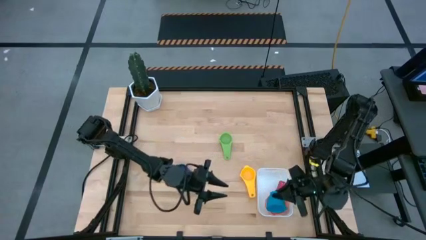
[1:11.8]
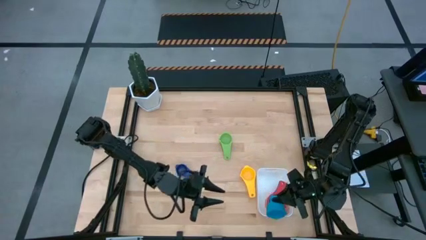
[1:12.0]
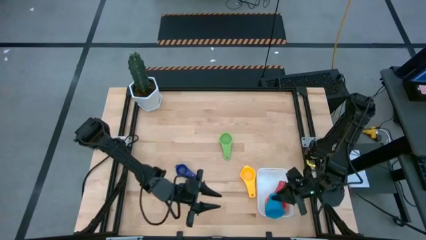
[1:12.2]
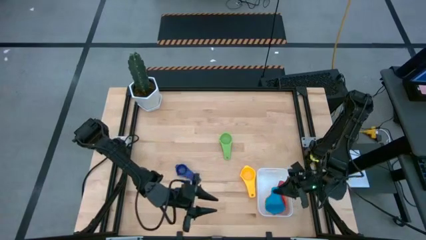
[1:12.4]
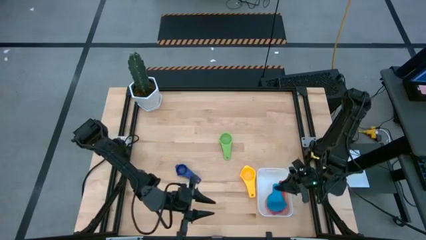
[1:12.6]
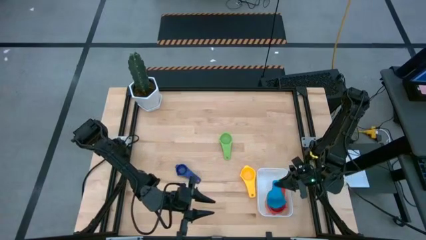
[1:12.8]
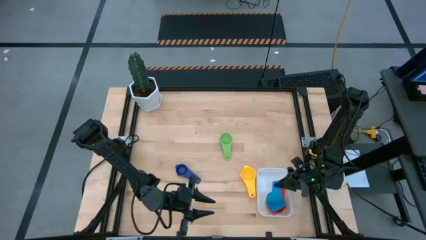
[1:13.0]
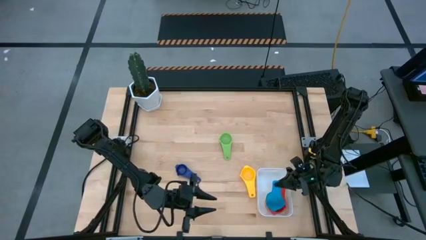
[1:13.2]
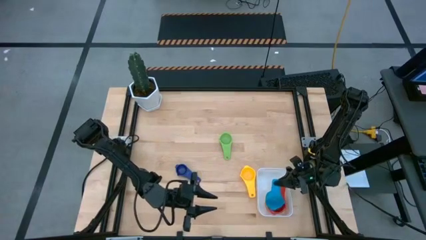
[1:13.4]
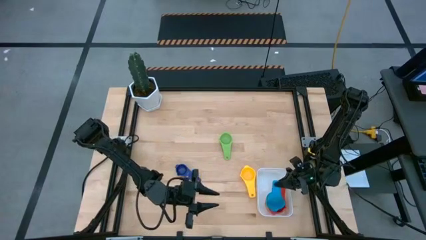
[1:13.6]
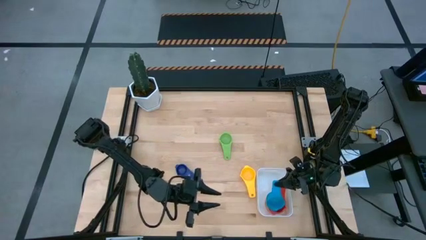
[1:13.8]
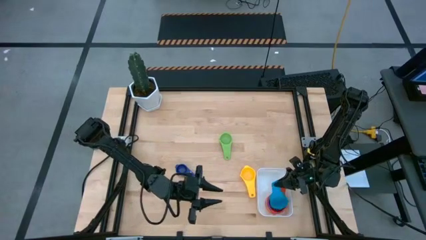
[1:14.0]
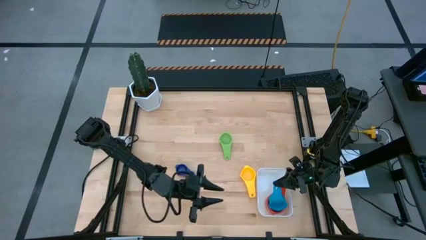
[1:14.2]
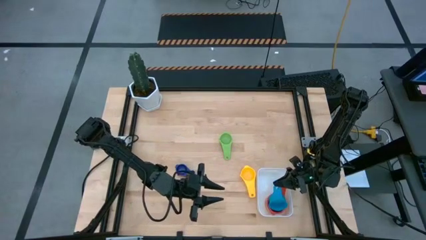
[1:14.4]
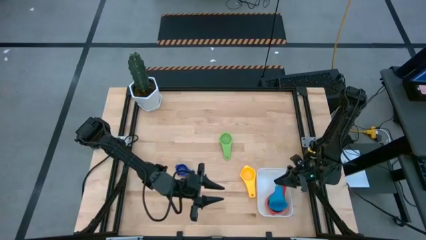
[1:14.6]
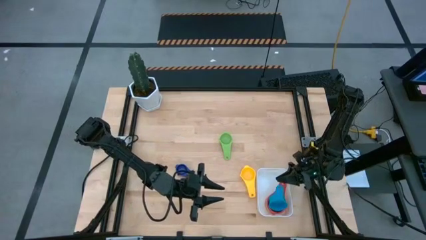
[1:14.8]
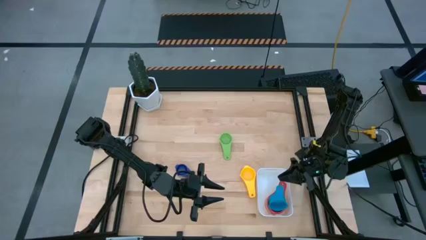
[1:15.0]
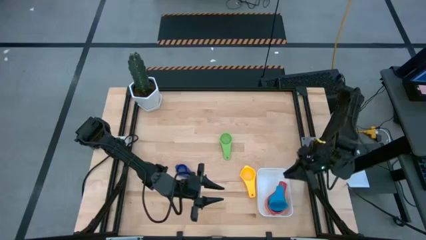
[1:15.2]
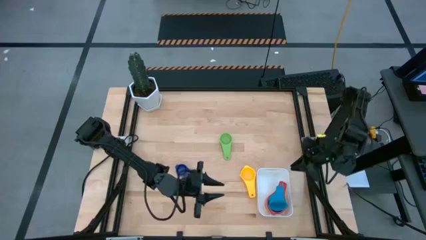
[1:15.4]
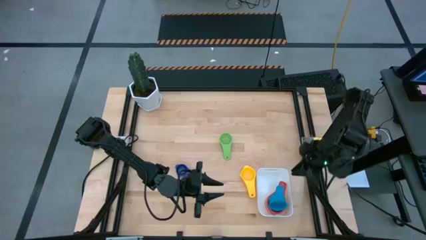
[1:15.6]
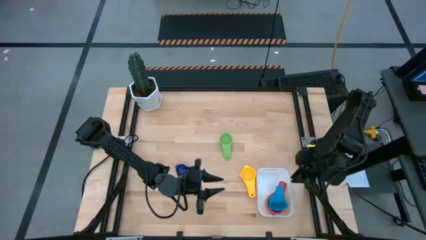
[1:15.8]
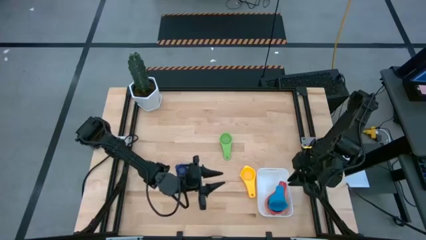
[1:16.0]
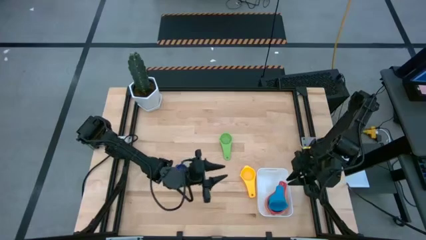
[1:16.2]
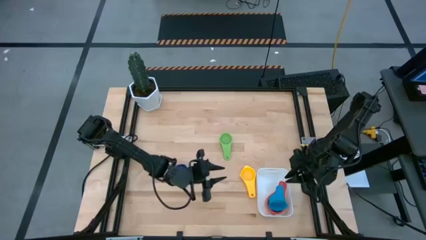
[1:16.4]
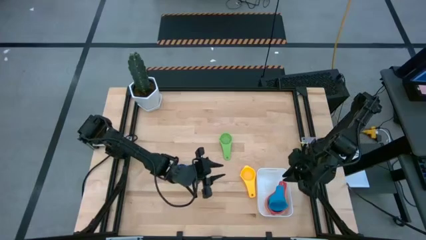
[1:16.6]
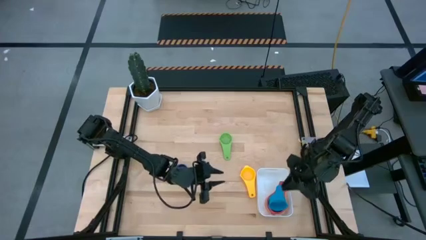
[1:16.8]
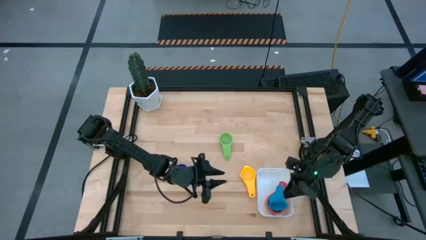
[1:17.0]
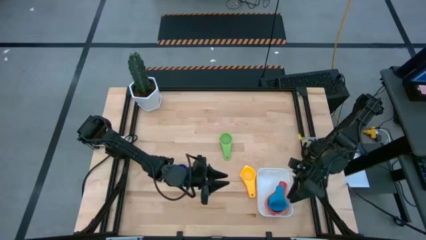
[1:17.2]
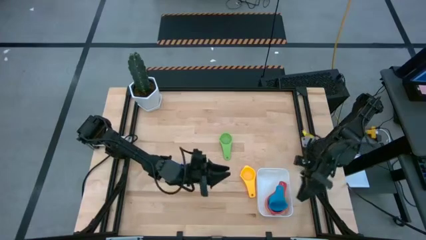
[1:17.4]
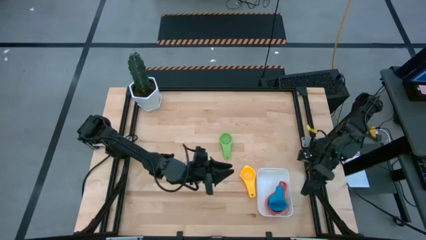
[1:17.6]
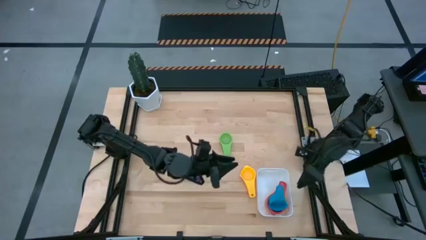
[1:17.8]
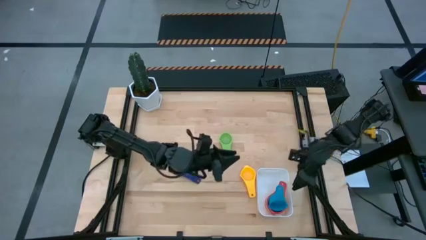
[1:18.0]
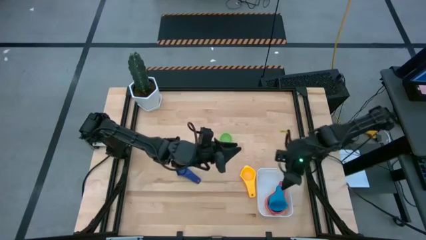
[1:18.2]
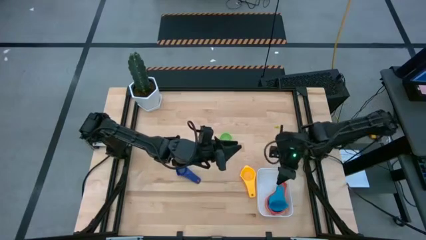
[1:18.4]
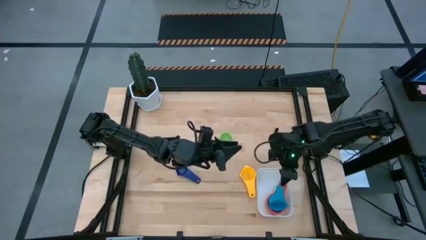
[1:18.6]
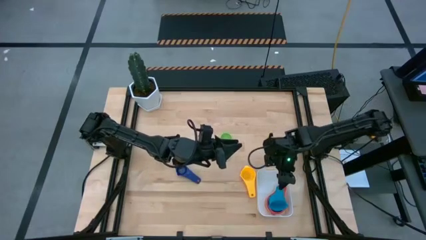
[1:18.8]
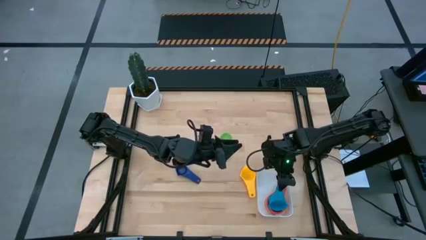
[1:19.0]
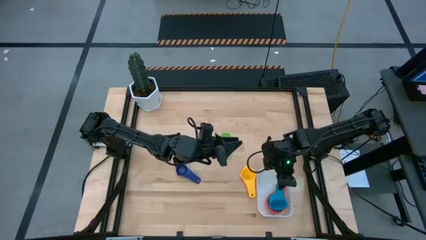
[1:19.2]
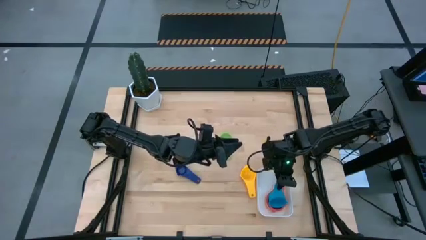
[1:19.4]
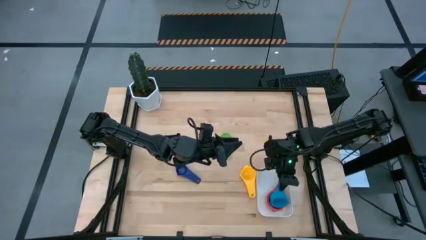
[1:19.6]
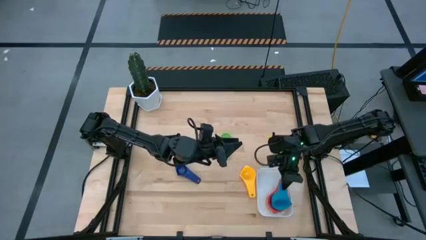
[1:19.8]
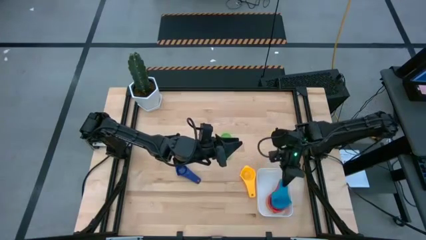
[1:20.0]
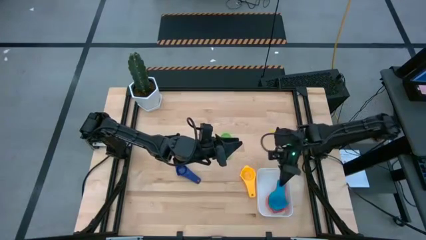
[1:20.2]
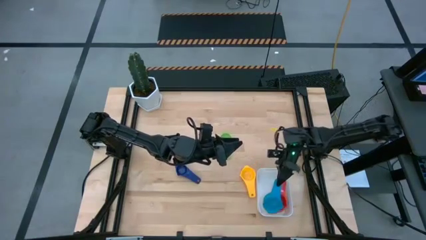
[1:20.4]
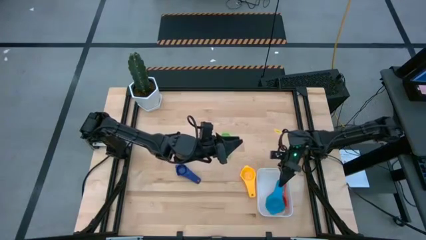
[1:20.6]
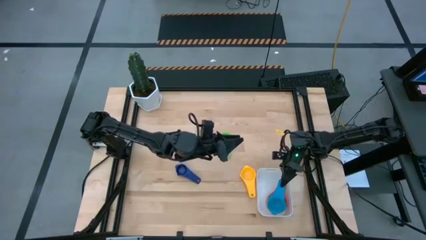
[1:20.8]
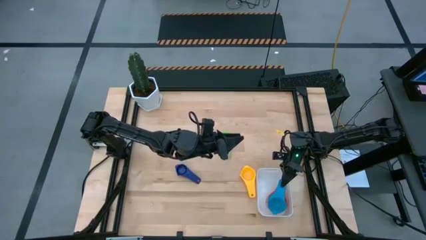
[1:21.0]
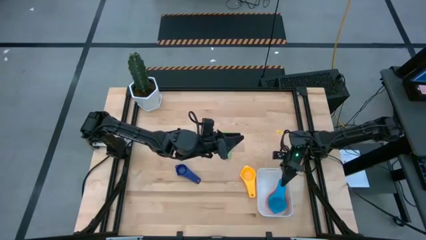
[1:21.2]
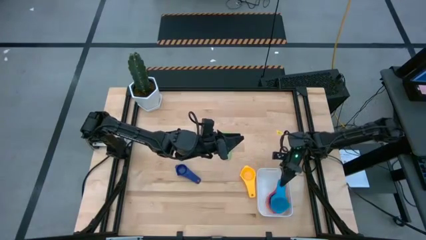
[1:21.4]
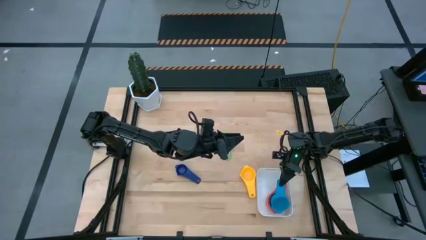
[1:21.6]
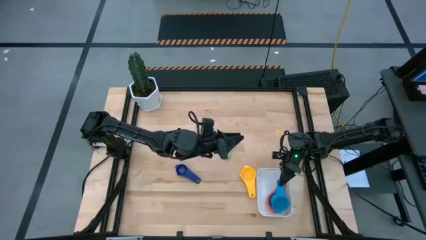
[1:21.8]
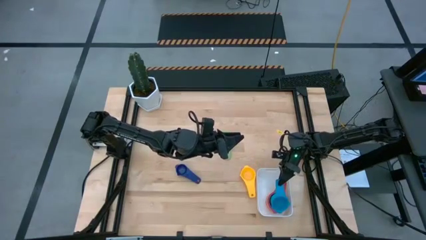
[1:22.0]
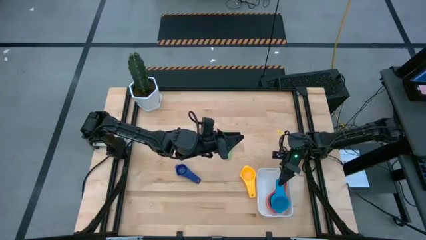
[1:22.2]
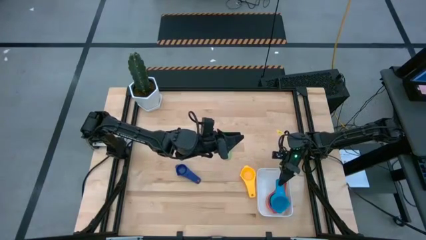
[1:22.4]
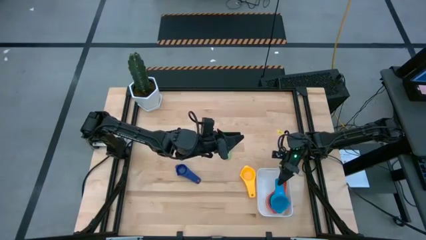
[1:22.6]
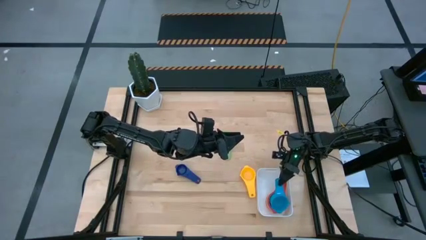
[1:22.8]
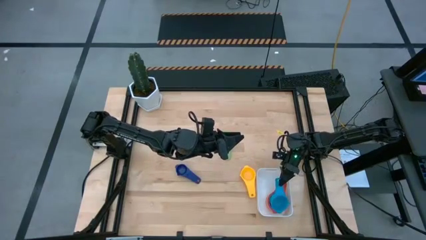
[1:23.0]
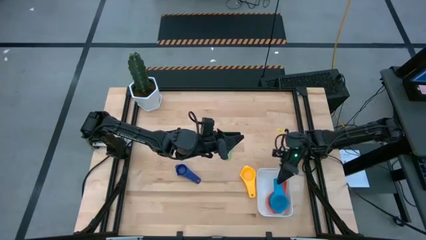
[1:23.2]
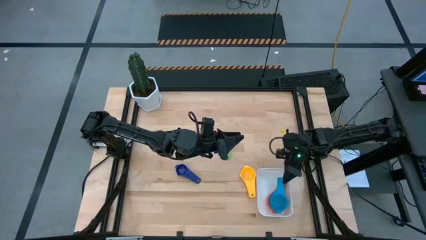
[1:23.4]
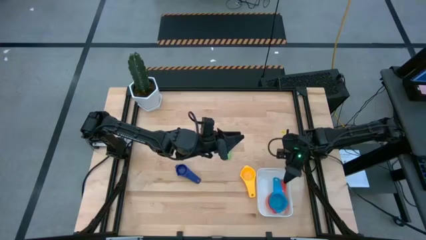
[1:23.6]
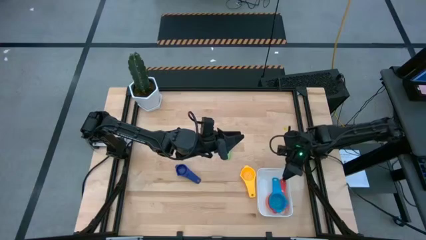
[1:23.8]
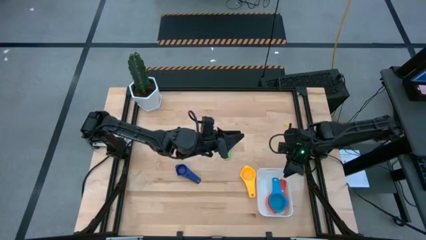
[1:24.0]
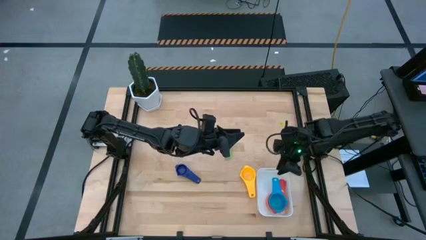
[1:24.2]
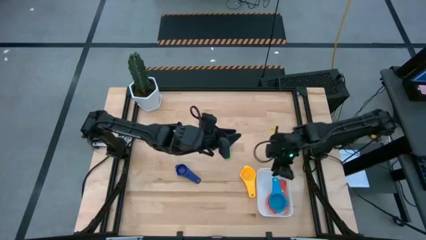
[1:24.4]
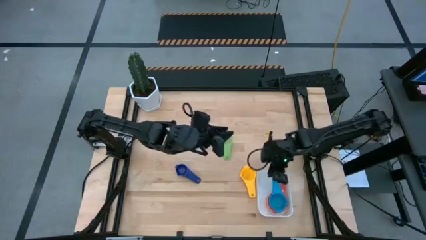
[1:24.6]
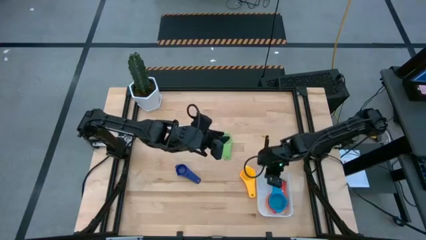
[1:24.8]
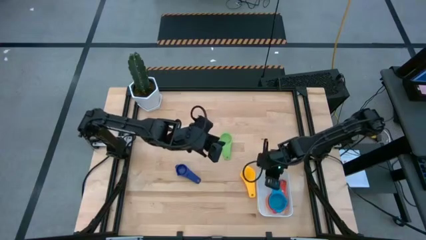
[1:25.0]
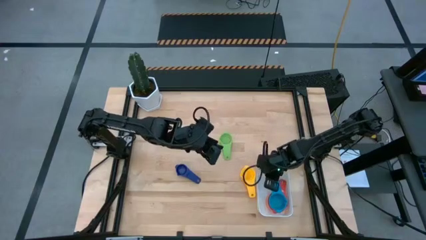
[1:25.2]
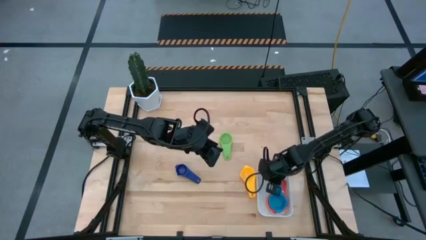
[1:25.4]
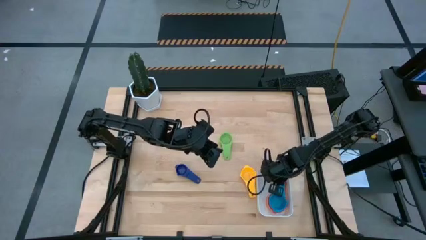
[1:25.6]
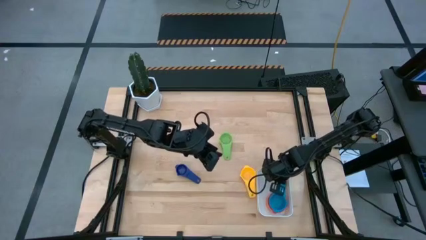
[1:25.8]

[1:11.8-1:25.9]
Task: Nest measuring cups in basket
Stack the light blue measuring cup on top of the red measuring cup into the white bin
